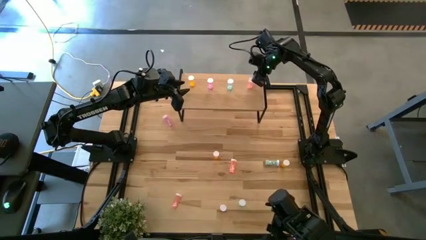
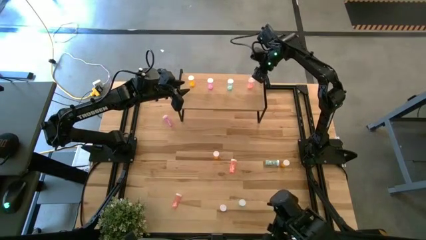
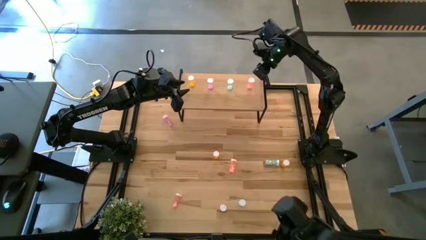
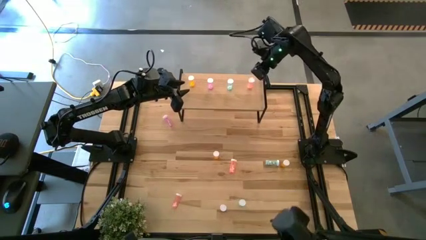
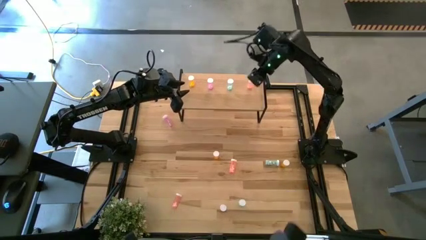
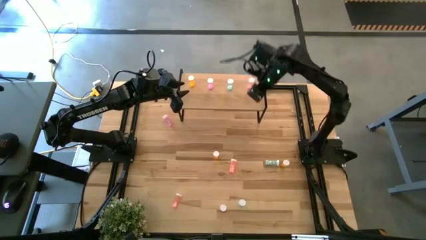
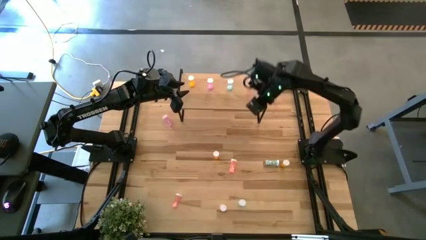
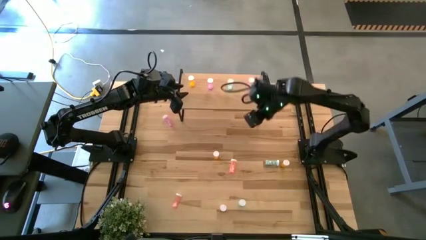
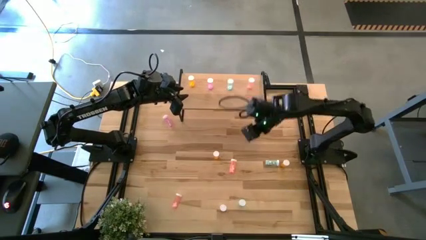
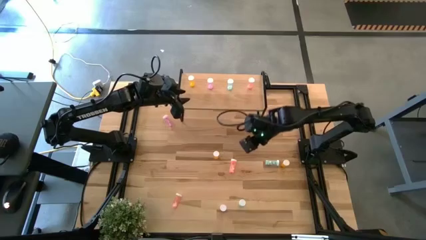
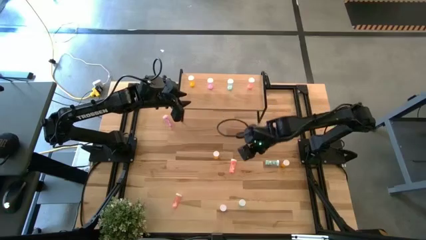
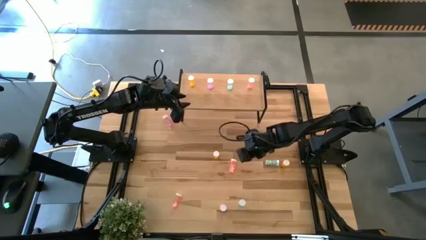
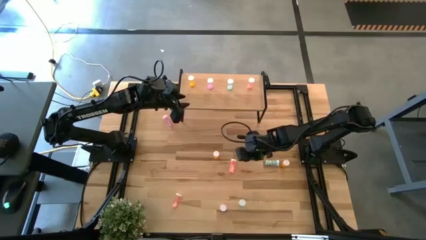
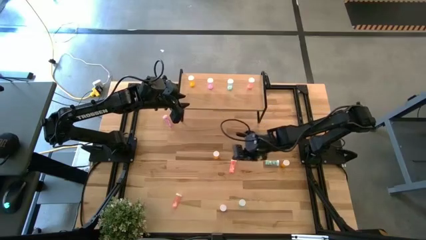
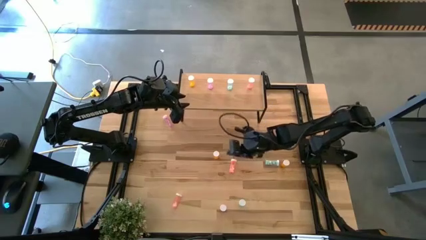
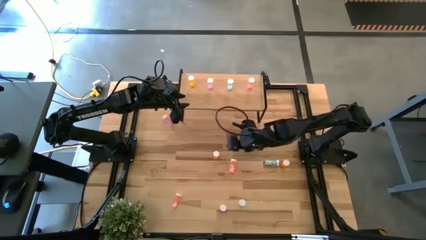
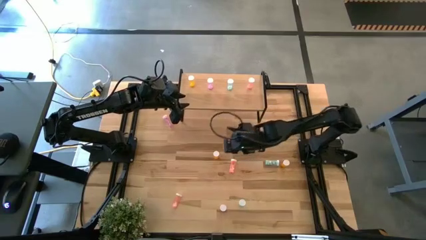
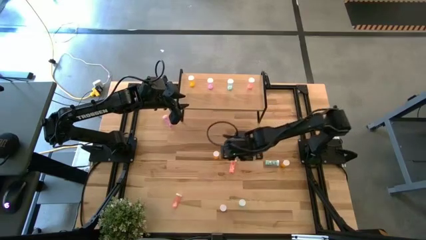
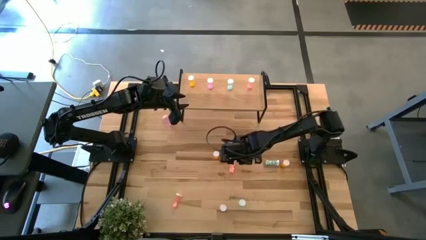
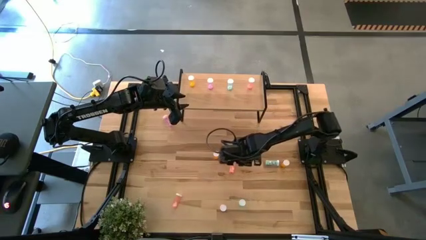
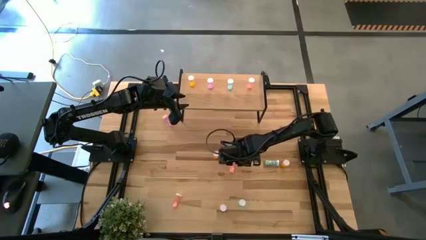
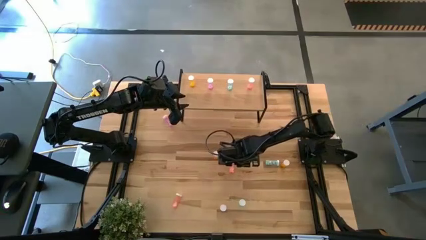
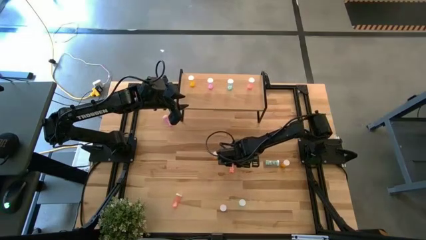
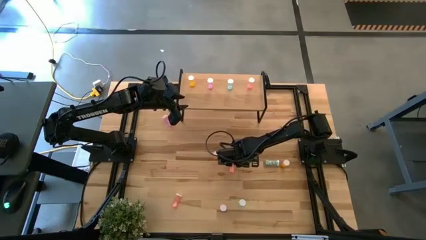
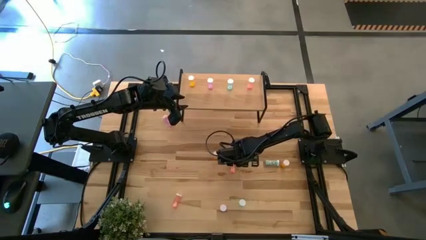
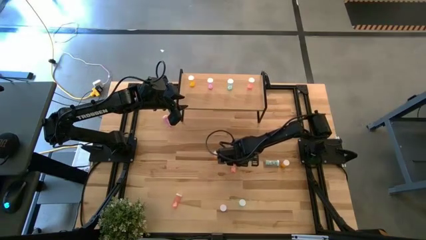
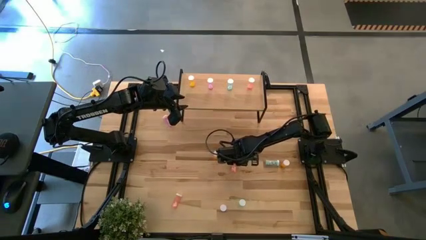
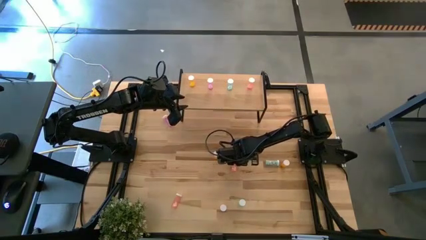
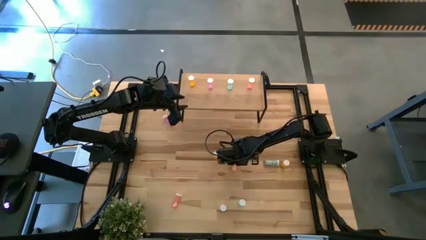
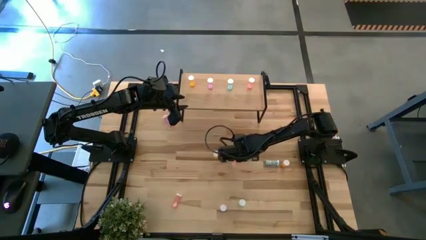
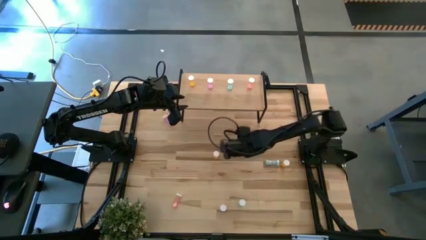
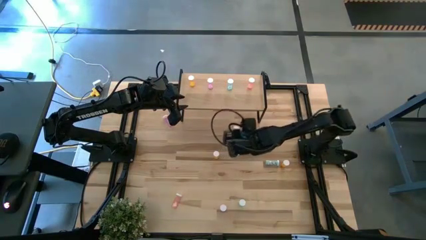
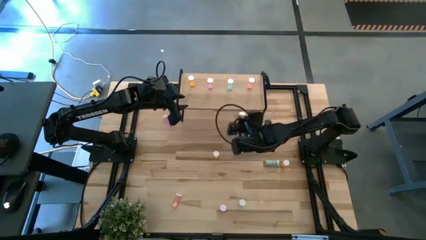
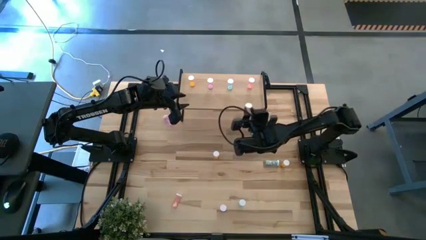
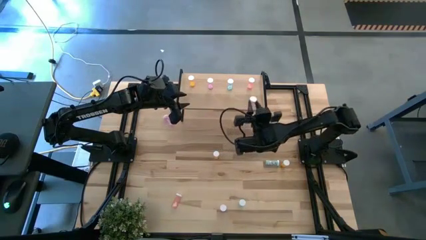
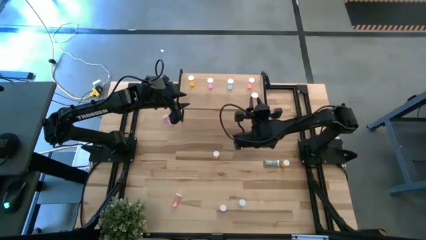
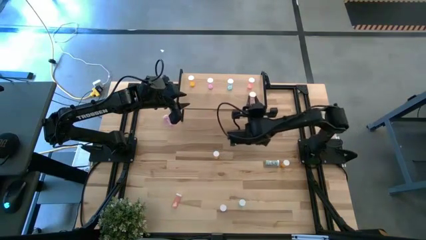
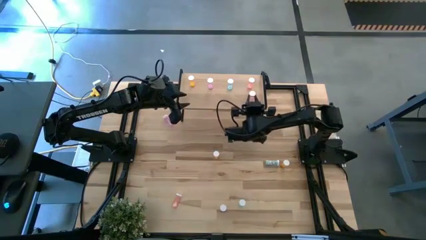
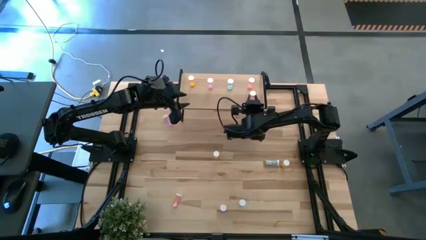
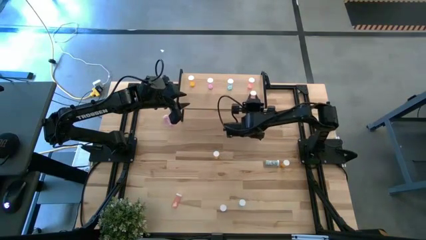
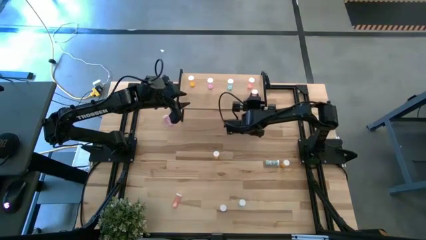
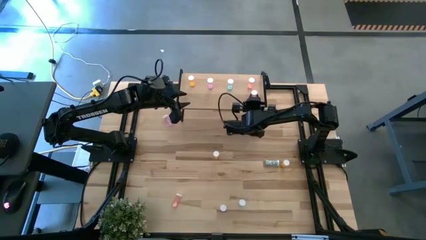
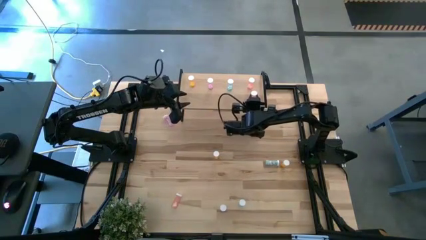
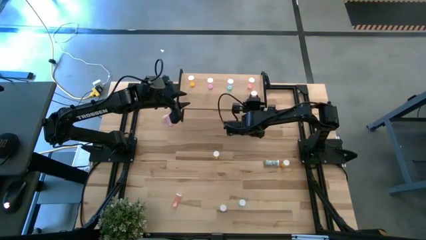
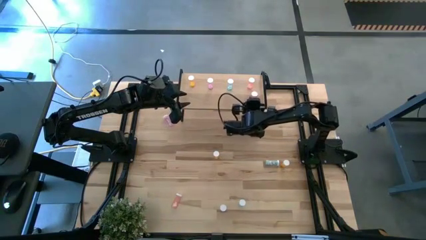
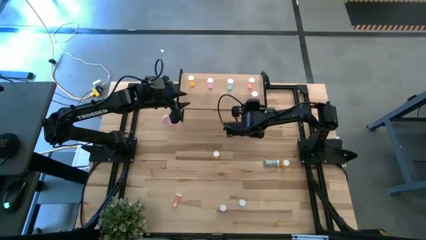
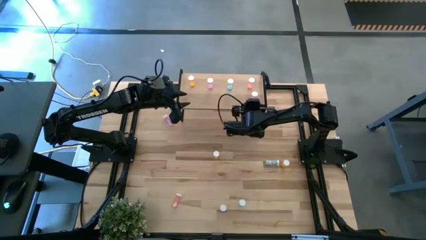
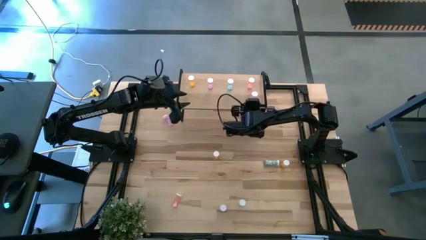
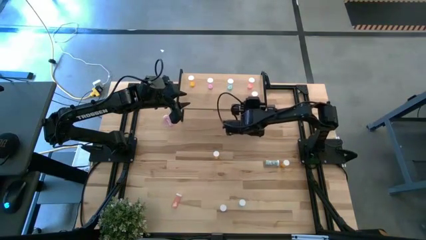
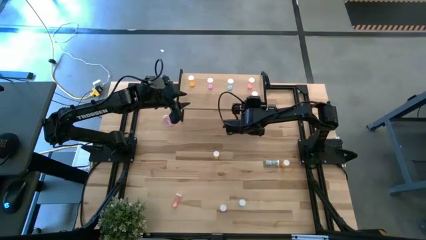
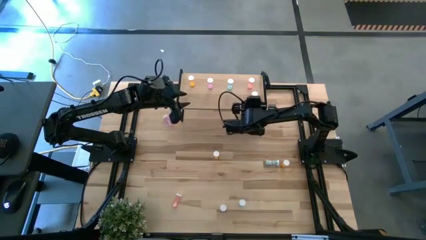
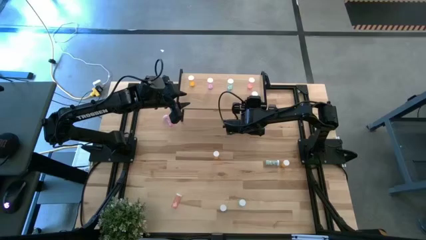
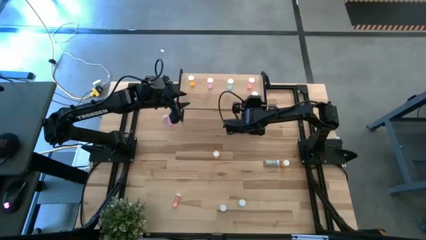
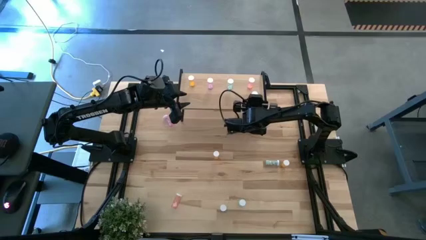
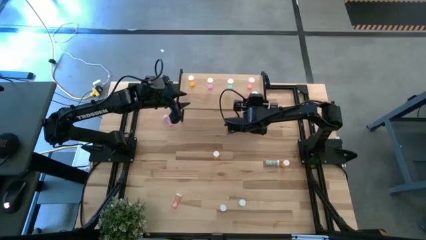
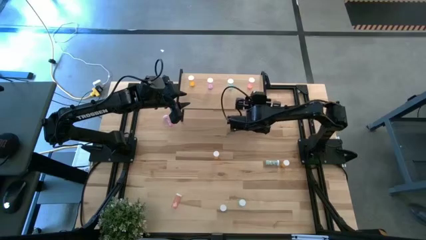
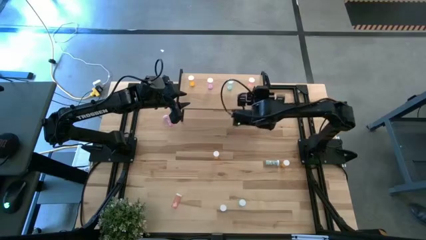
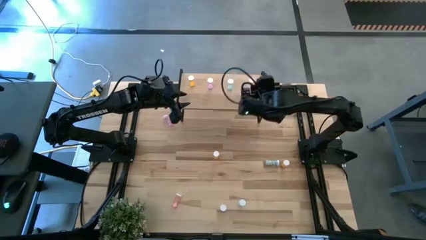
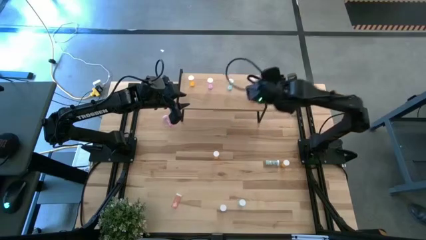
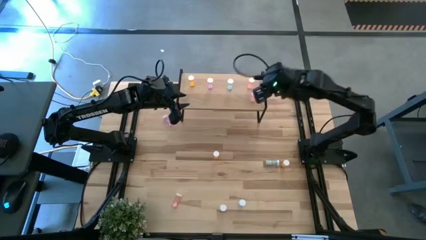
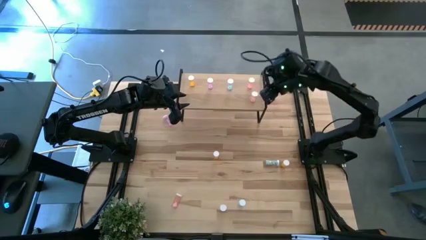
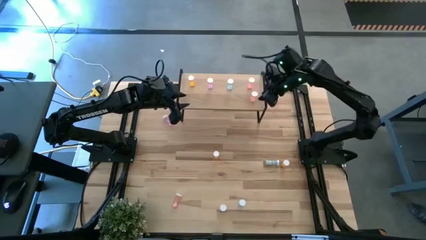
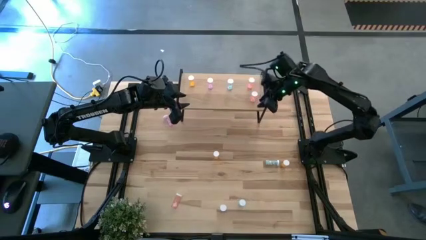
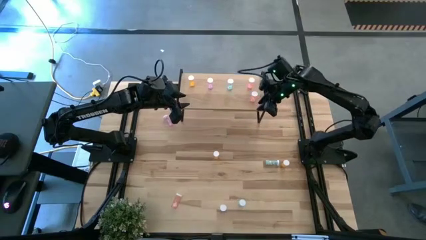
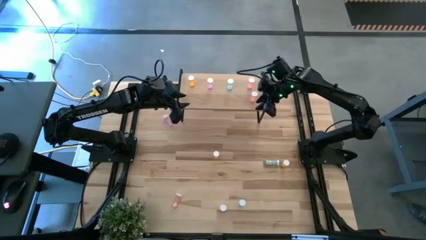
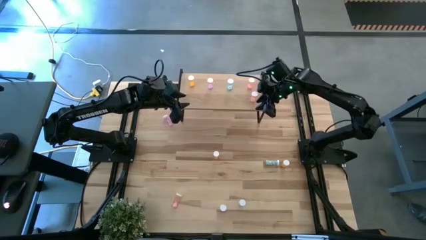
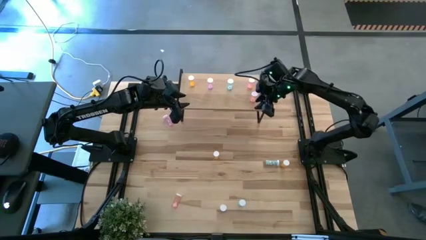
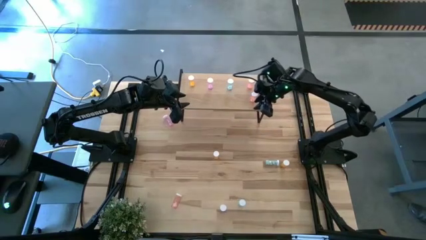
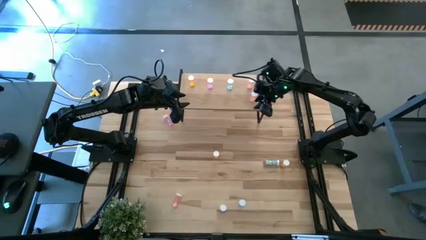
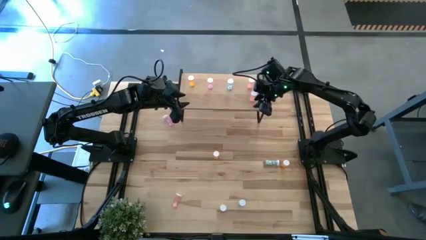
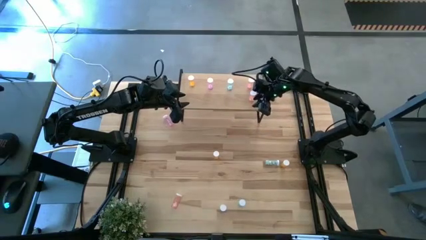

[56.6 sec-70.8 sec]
Task: Pick and place medicine bottles onto shelf by color
Put the top pink medicine bottle on the shelf aligned with the other pink medicine bottle
